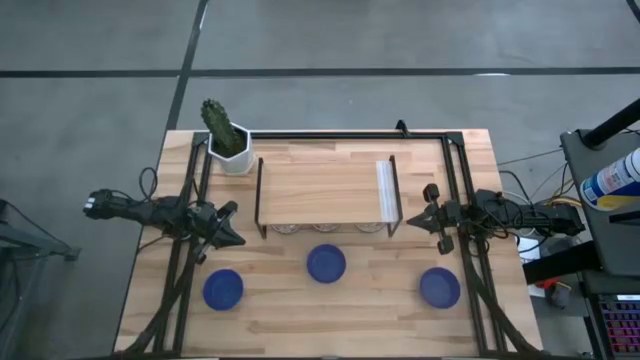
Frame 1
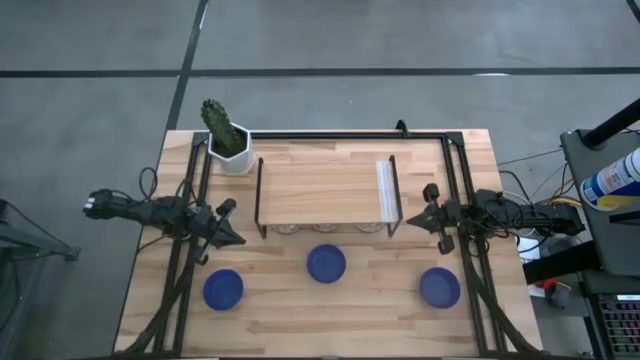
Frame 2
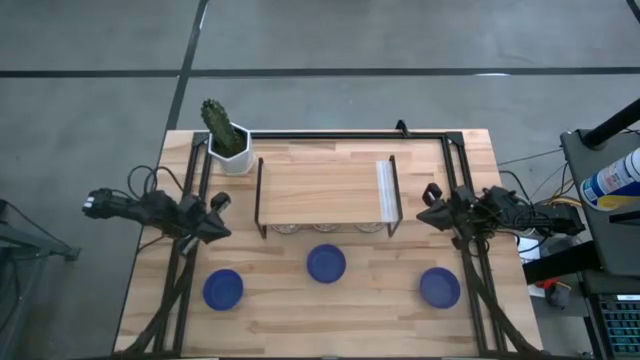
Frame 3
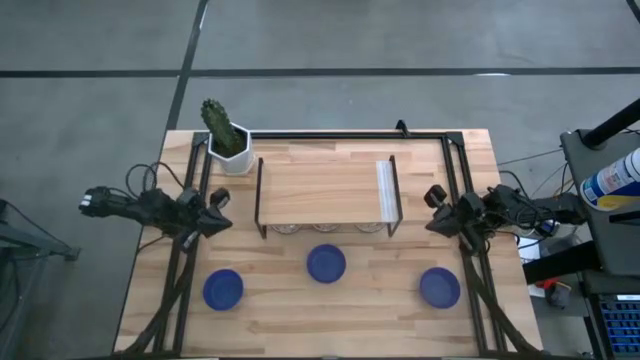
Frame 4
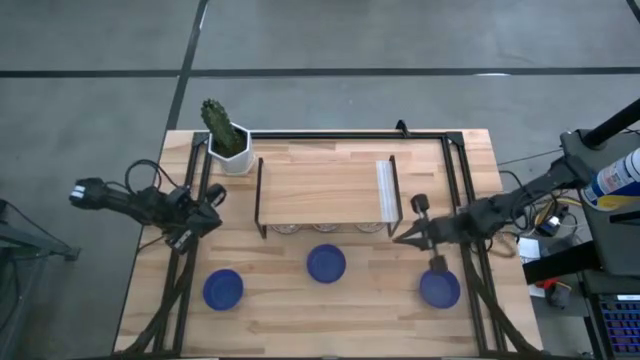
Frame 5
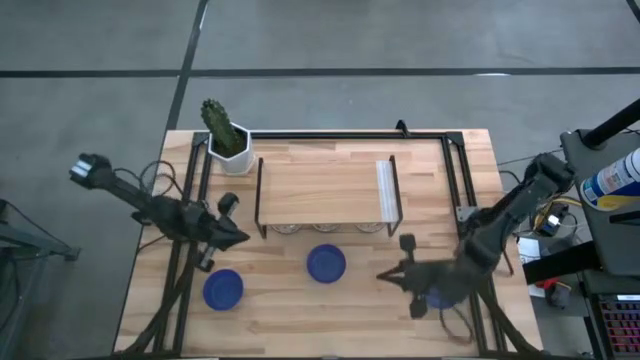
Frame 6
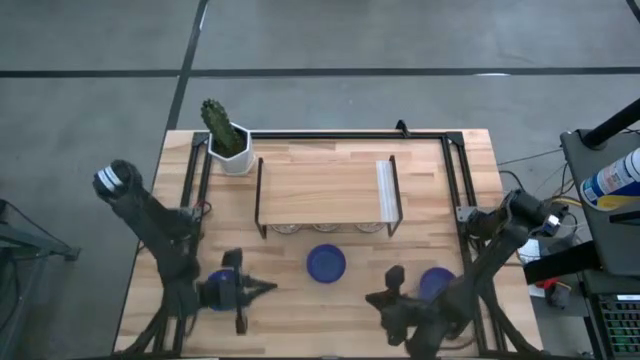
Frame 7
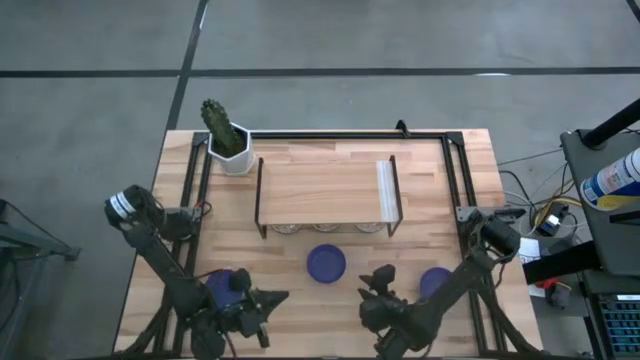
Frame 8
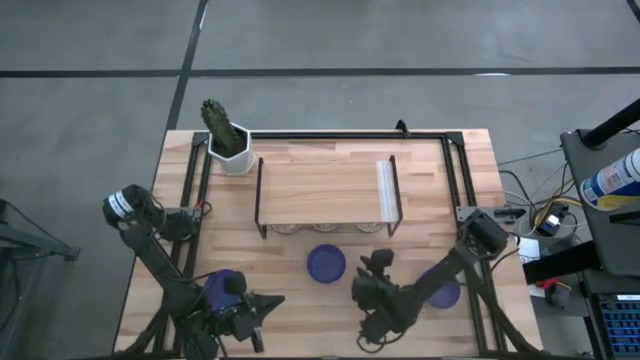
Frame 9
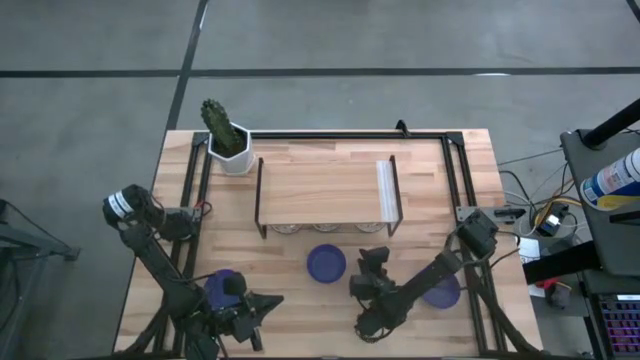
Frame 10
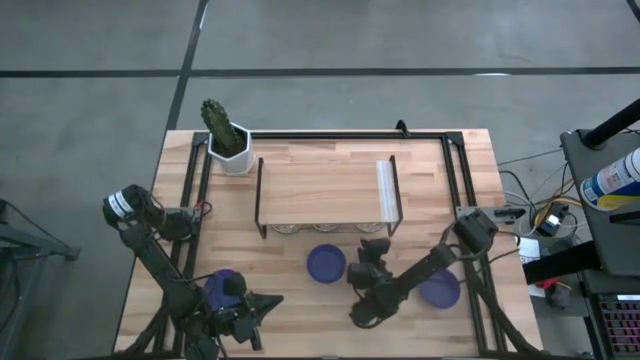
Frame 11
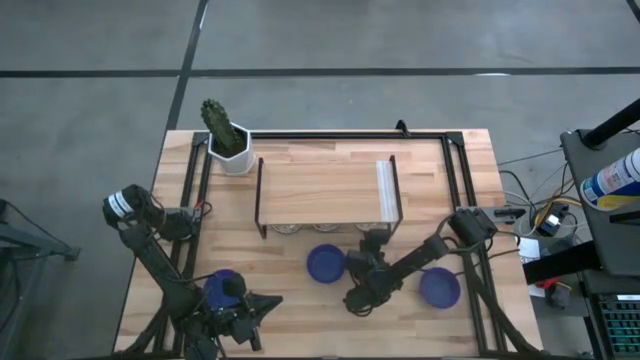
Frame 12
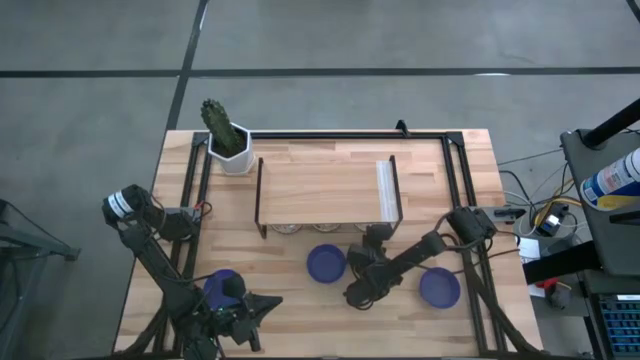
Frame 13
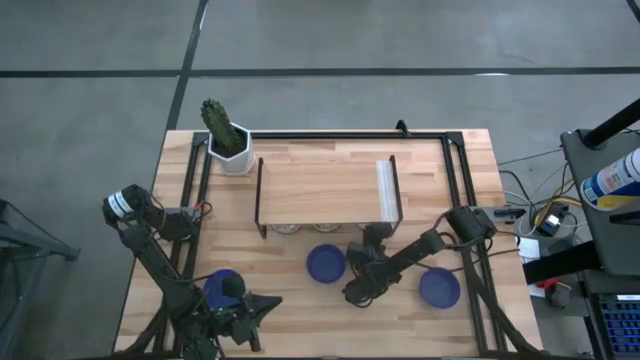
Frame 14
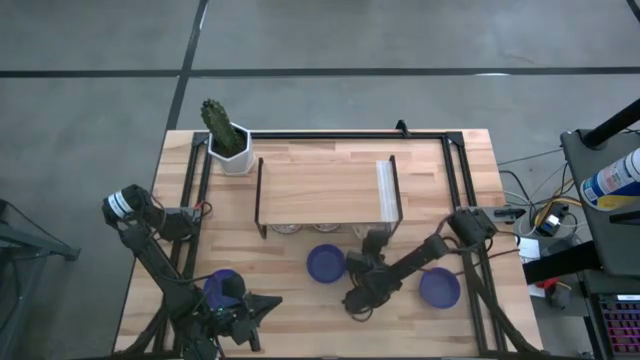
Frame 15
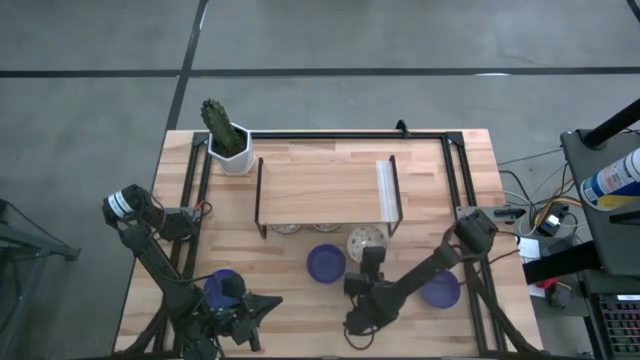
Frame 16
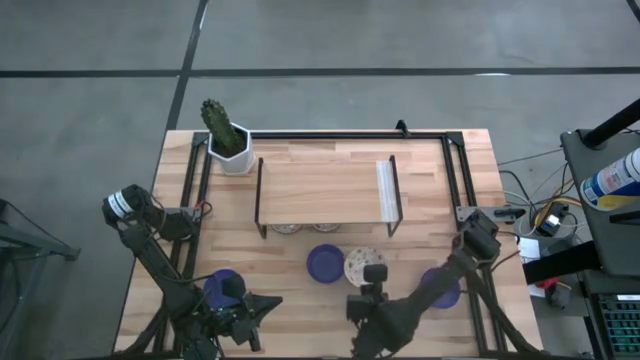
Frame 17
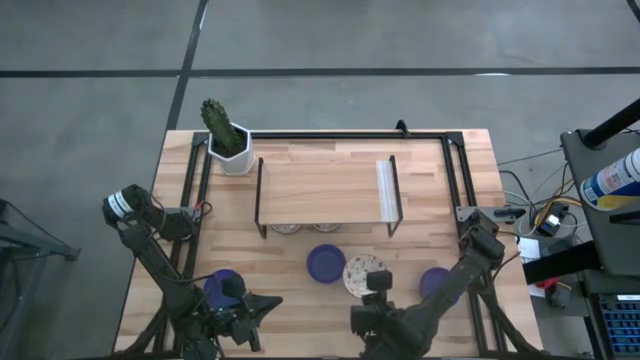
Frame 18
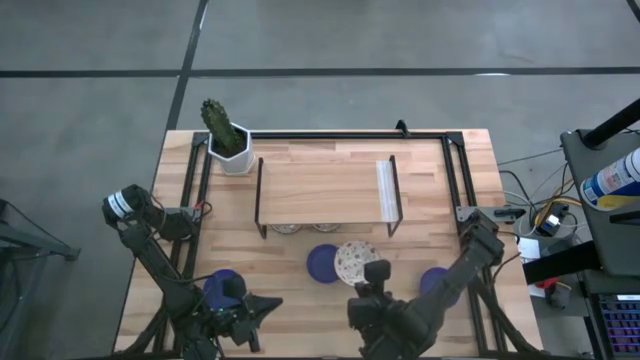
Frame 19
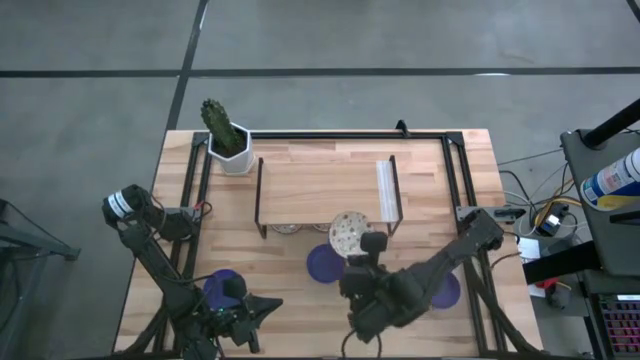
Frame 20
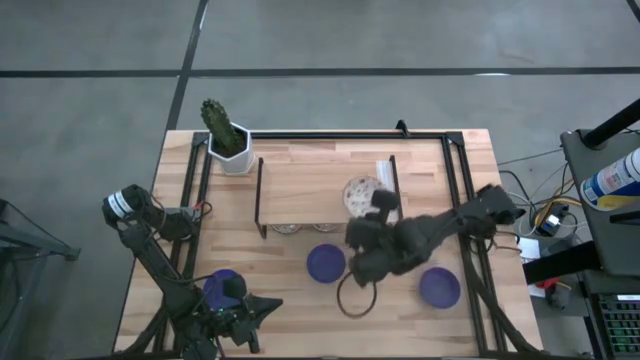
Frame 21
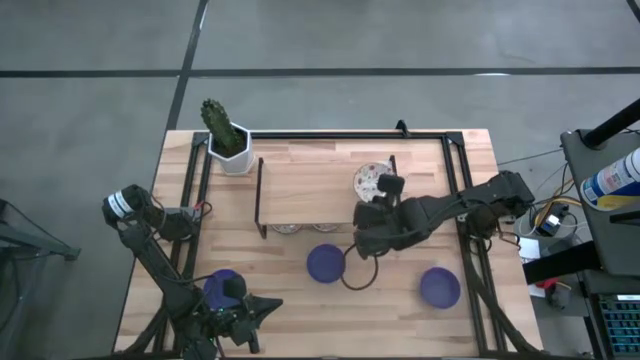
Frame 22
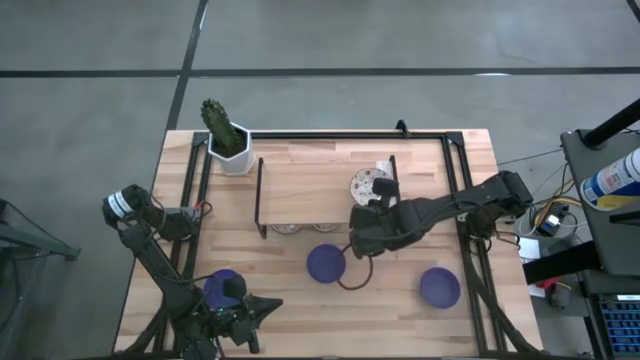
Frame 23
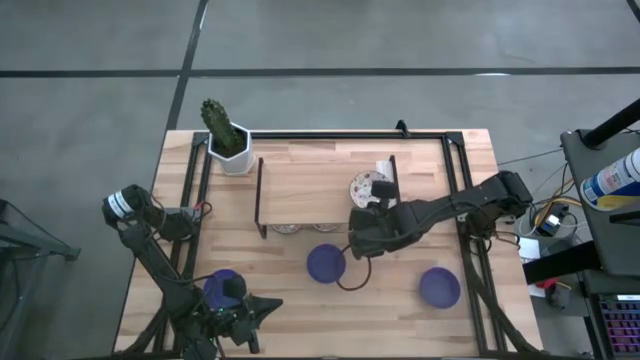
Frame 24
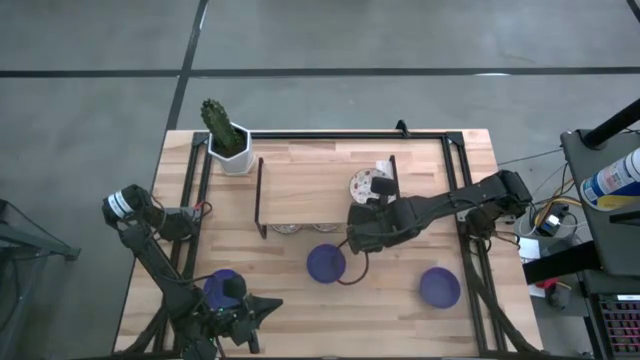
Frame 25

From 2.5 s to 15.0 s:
Task: Pick & Place Mini bowls
Put the right red and white bowl on the shelf

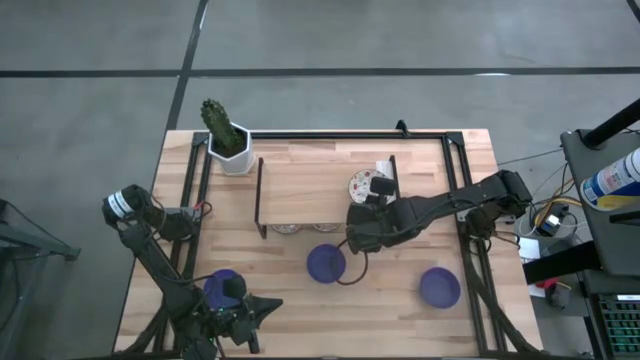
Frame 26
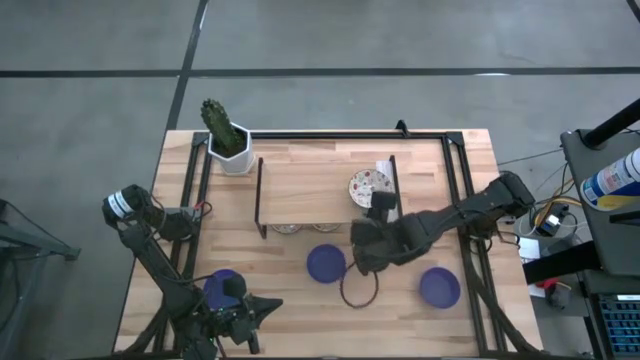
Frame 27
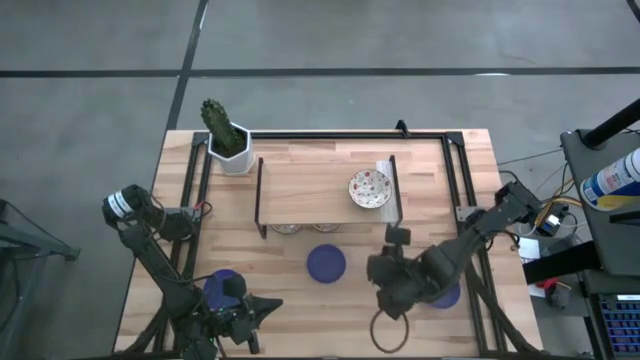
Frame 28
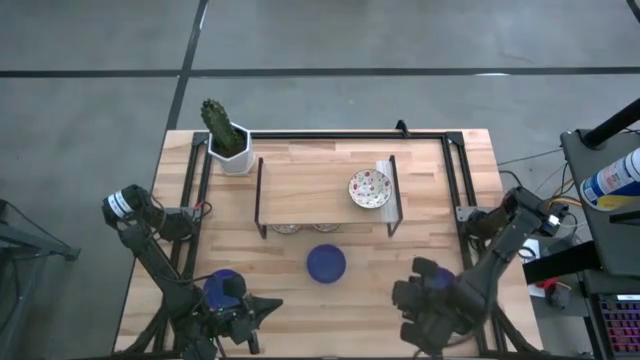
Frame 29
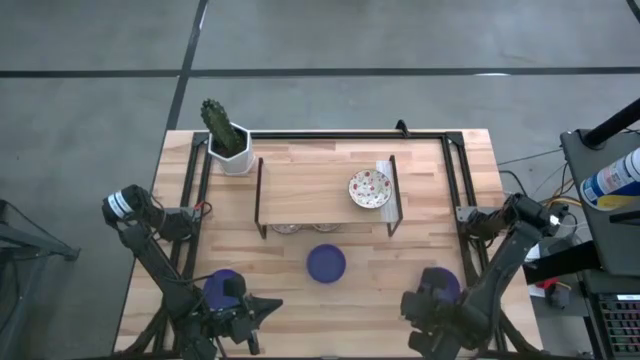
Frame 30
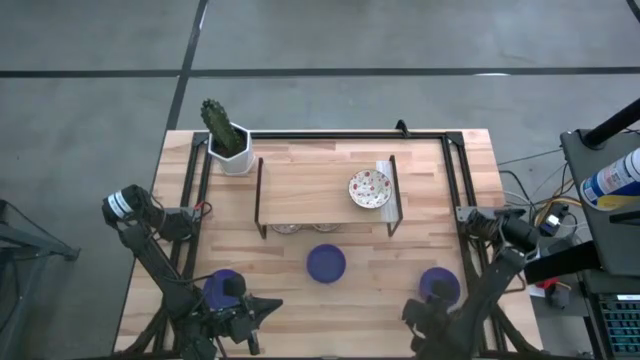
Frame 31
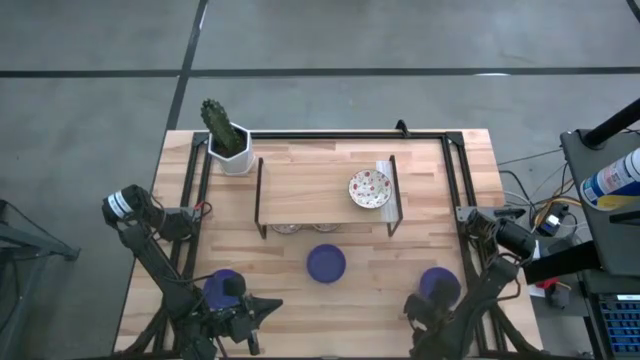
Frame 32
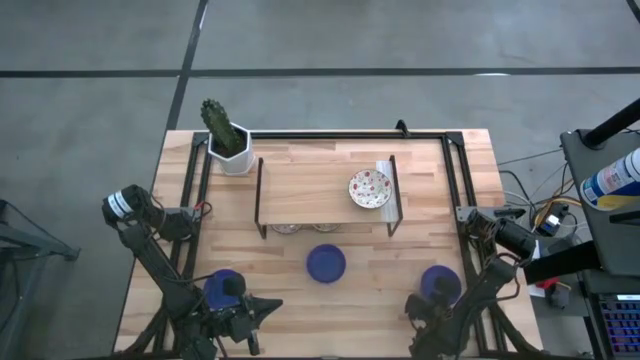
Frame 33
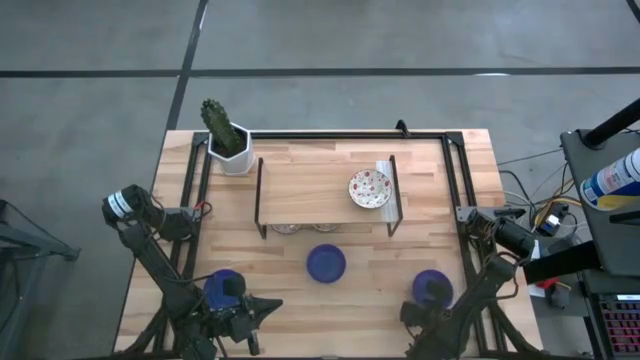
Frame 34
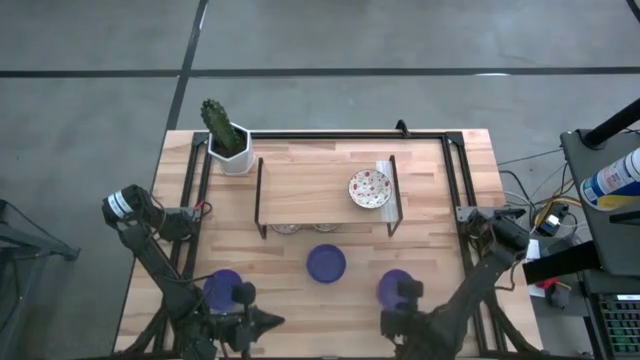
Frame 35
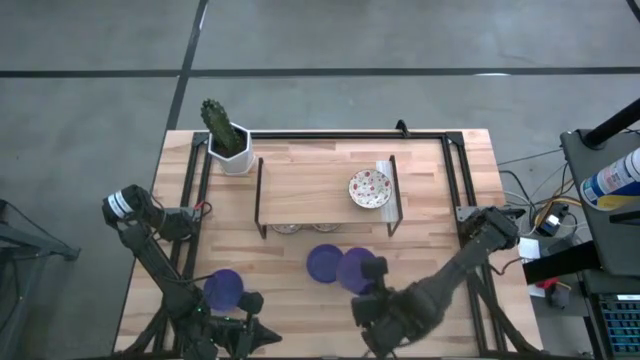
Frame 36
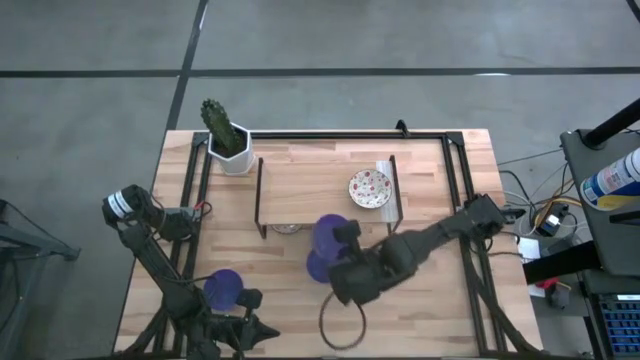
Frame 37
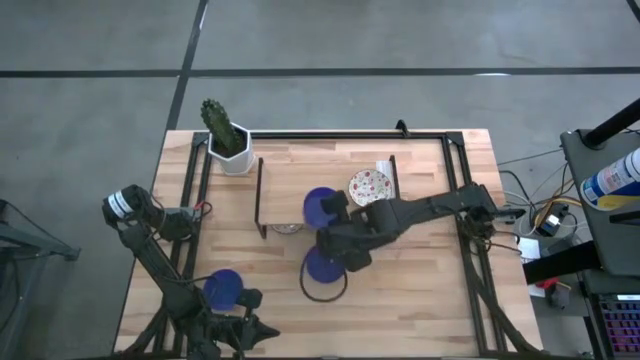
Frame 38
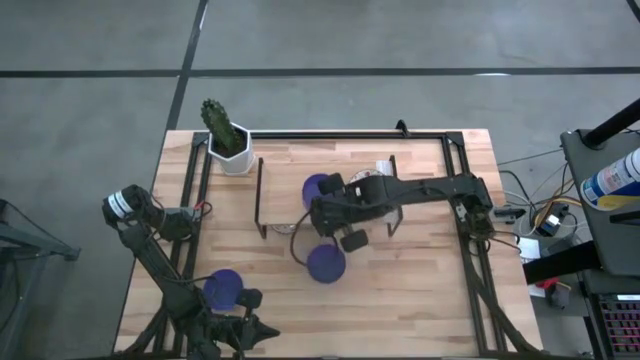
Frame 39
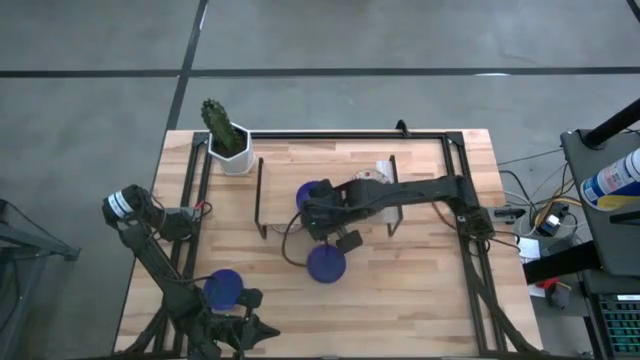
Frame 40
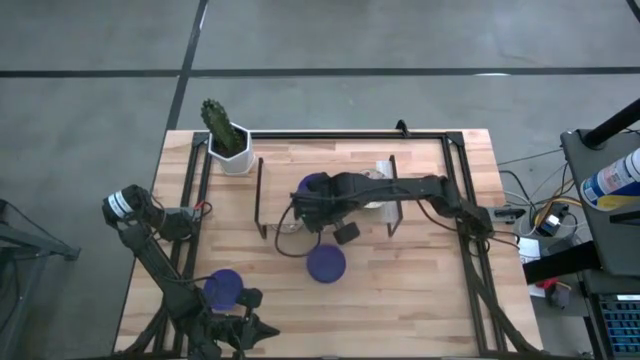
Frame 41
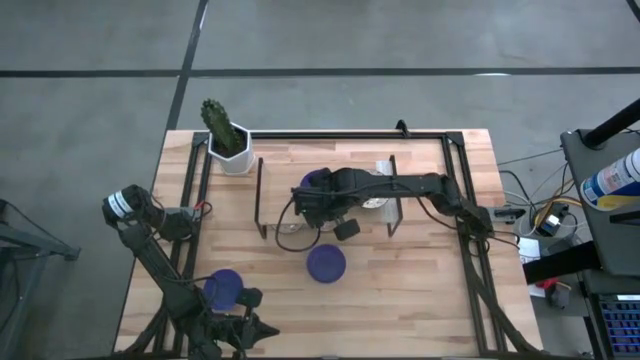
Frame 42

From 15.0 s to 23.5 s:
Put the right blue bowl on the shelf
